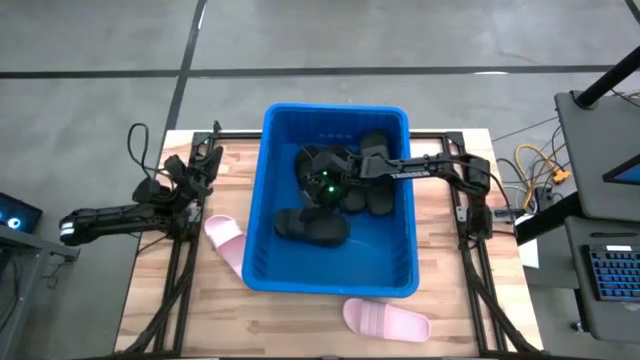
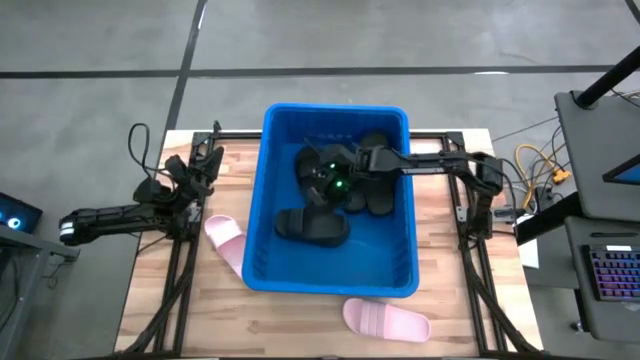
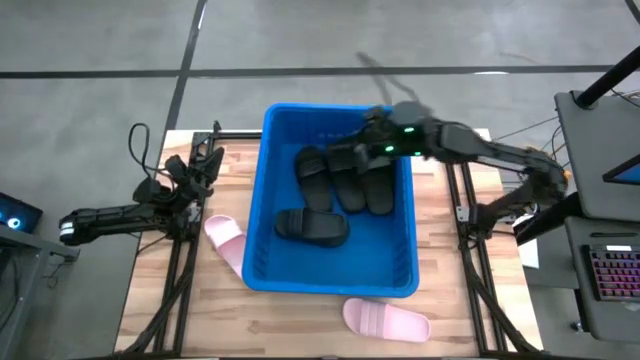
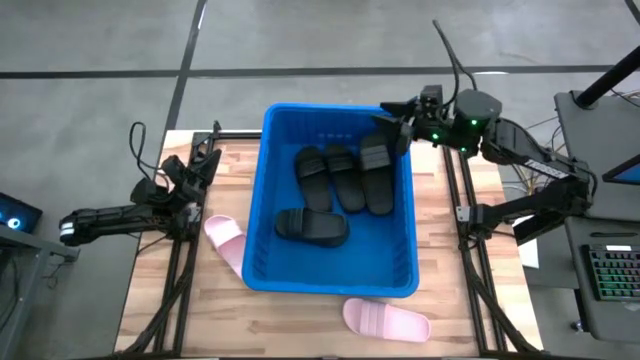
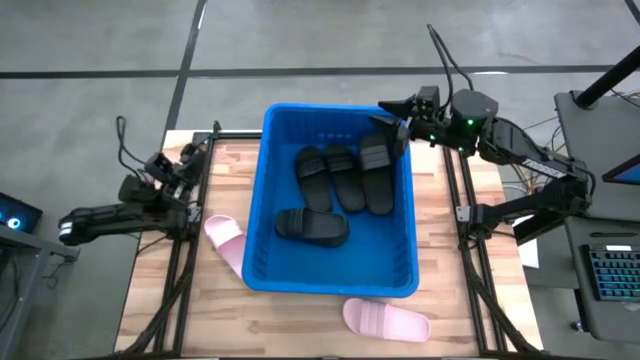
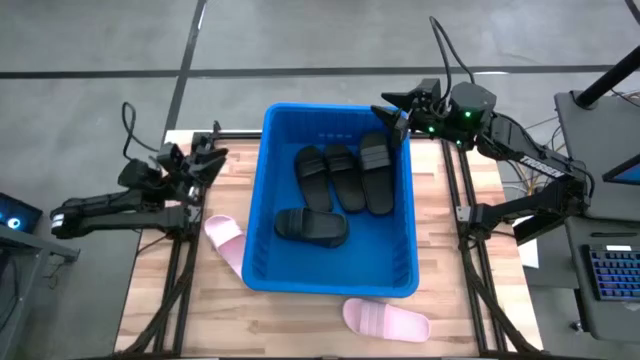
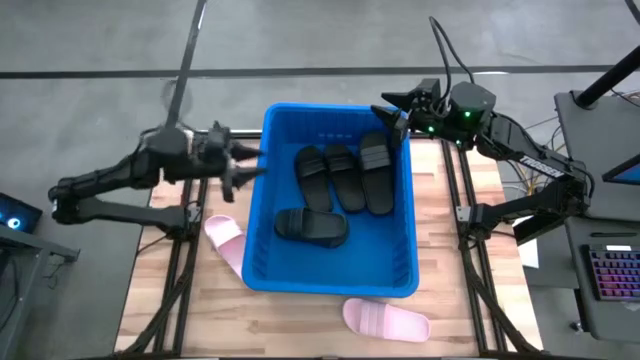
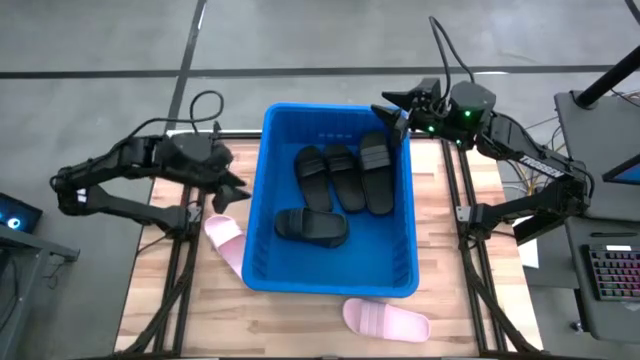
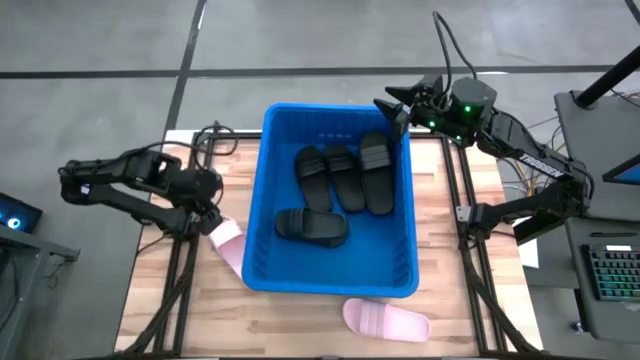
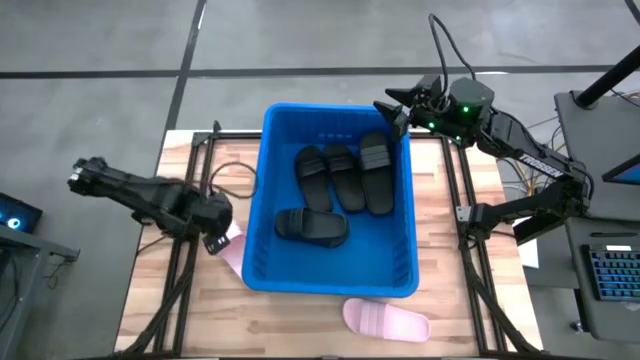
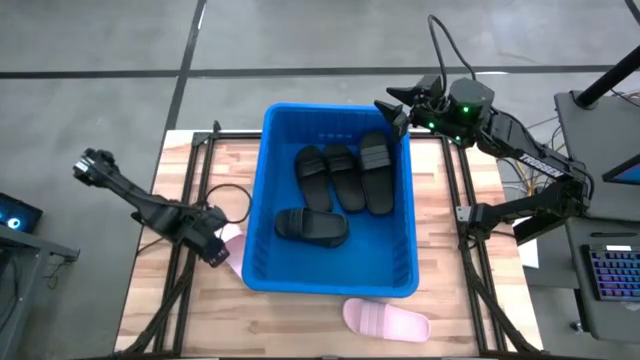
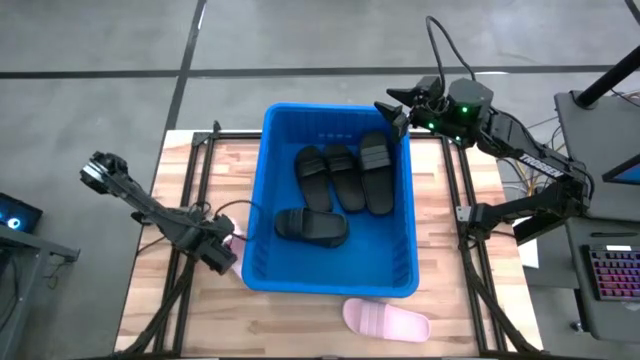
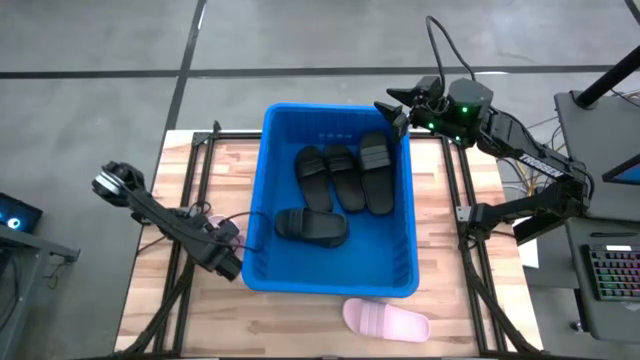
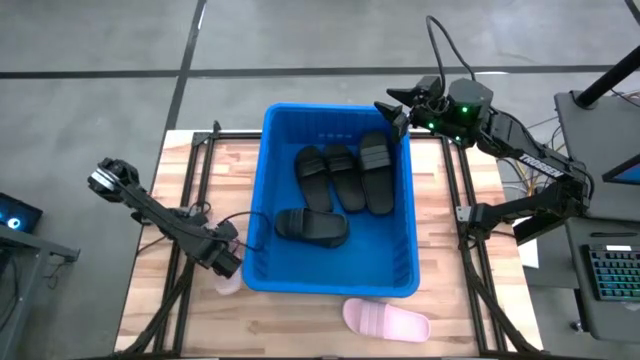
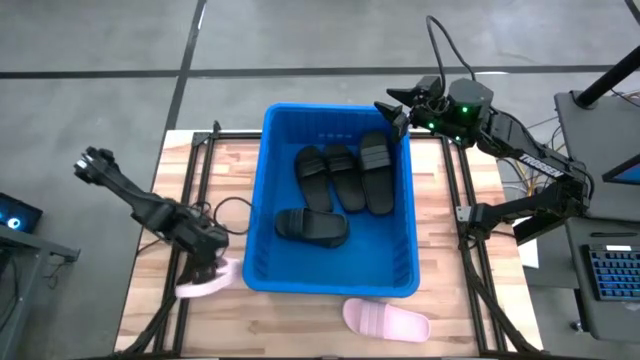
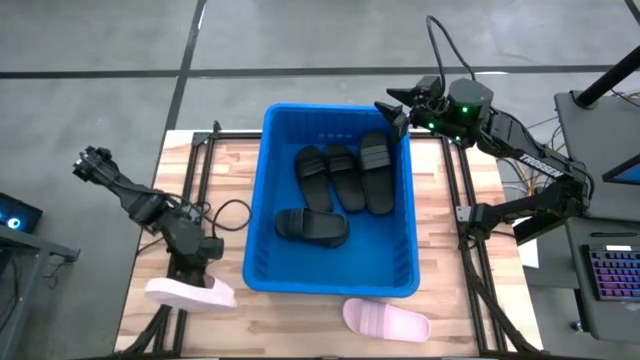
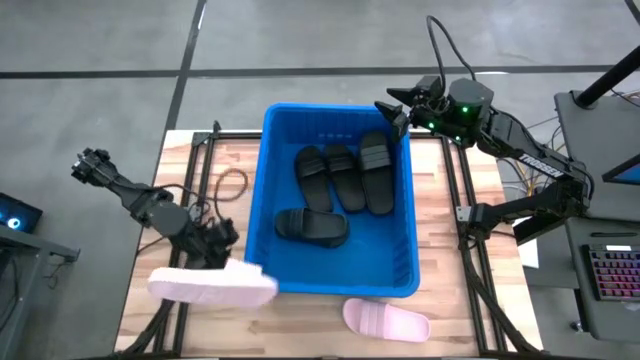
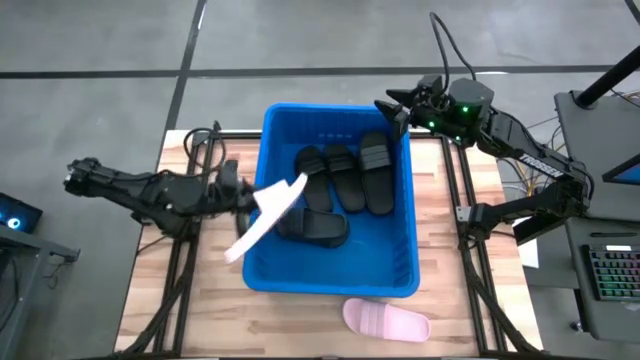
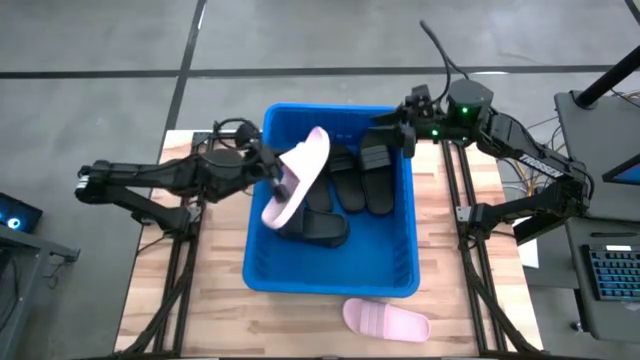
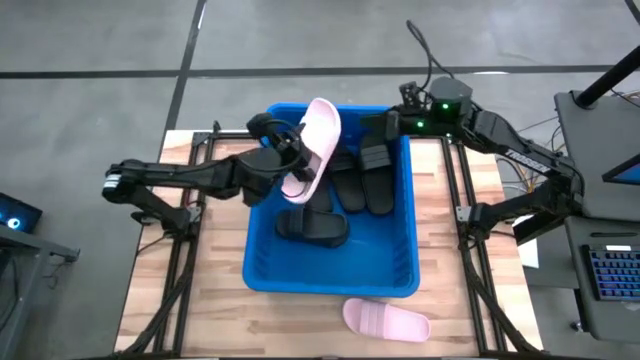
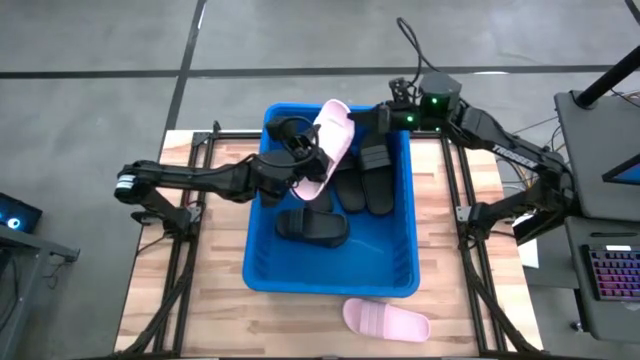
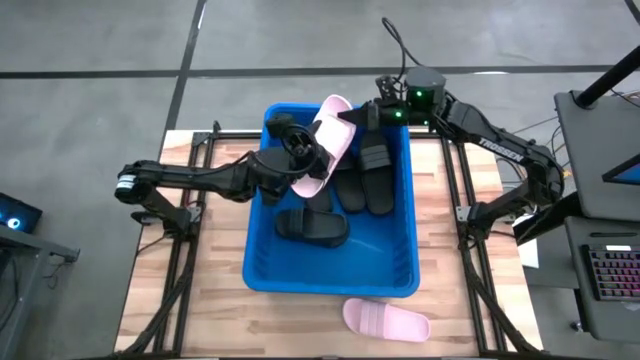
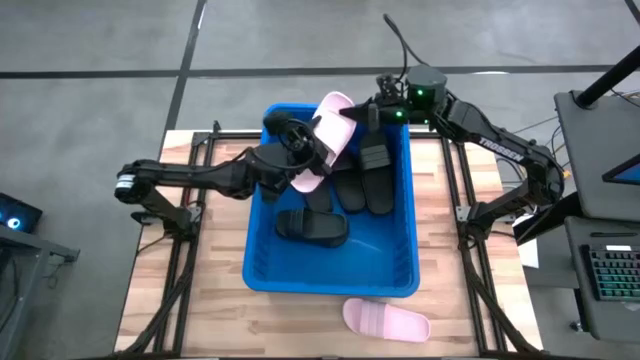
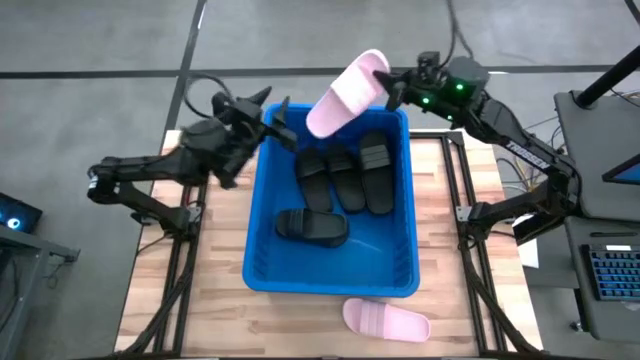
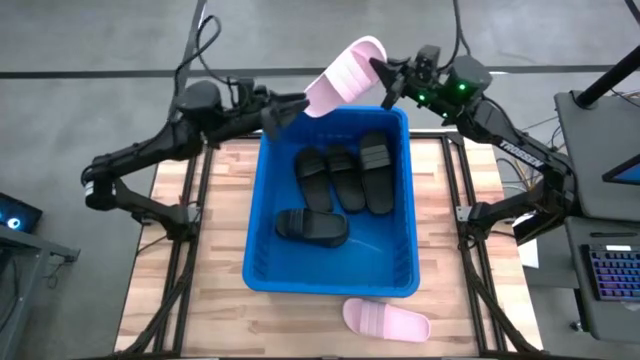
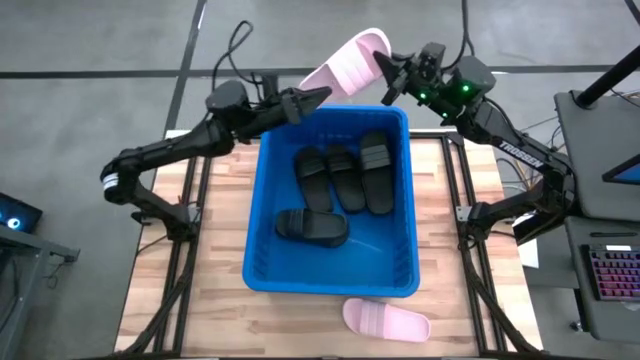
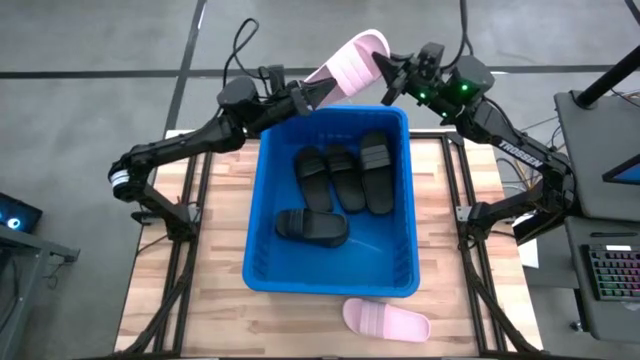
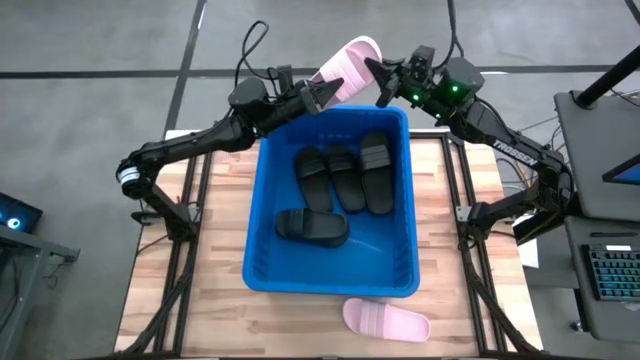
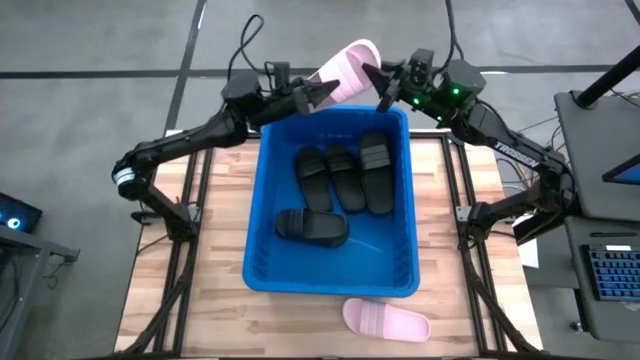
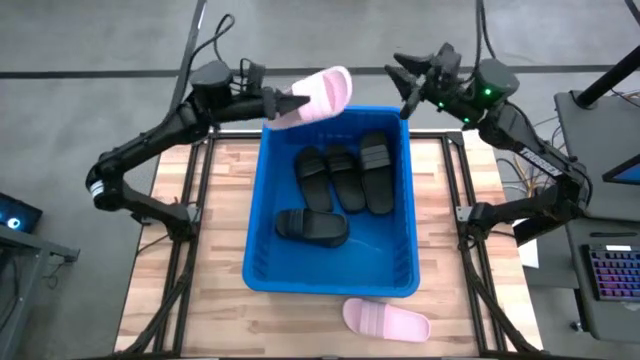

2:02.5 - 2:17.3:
Task: Pick and place slides into bin
Put the pink slides into the blue organize bin
